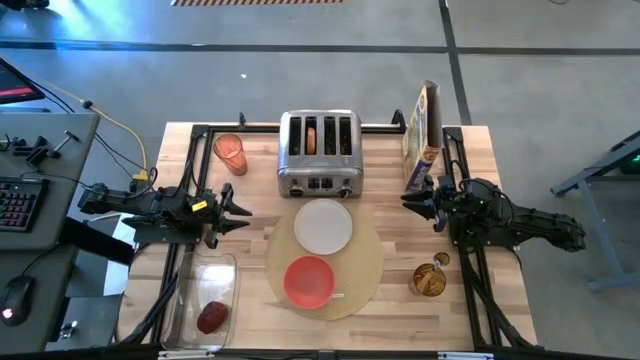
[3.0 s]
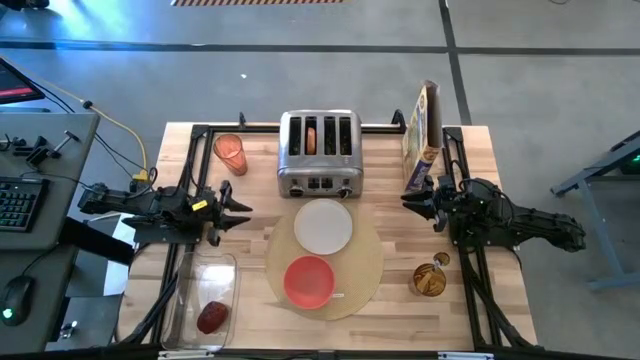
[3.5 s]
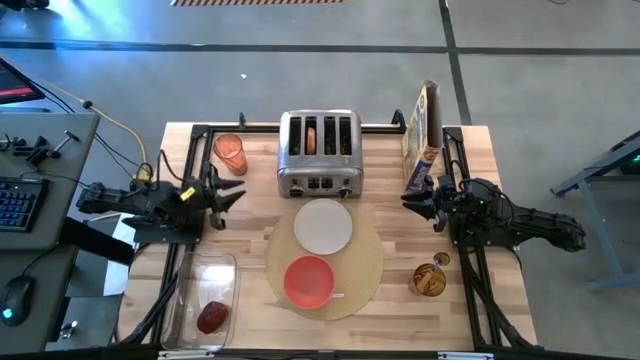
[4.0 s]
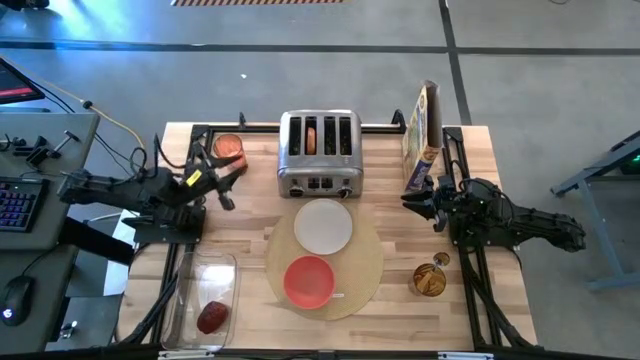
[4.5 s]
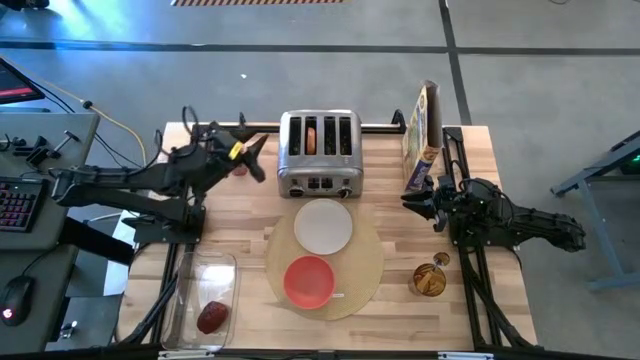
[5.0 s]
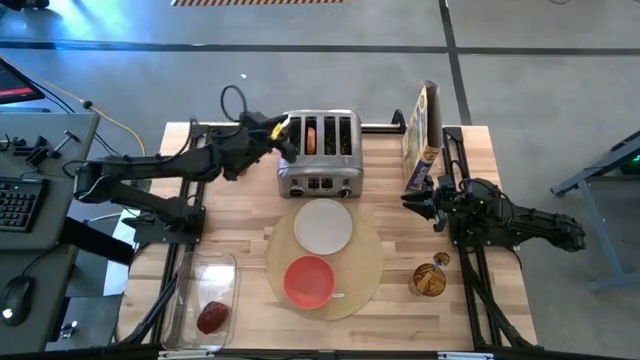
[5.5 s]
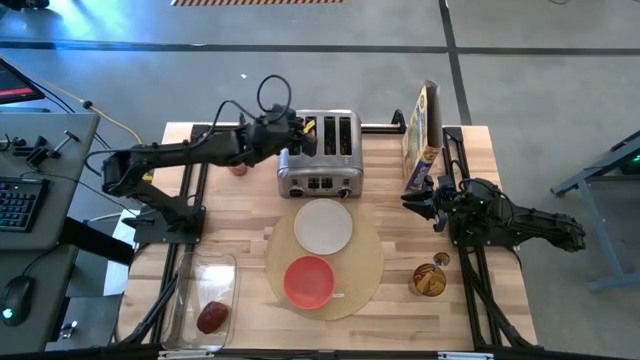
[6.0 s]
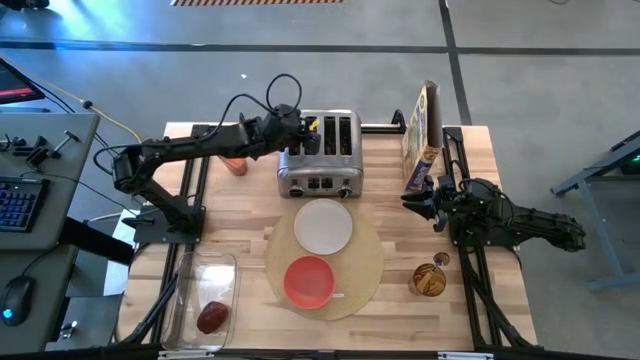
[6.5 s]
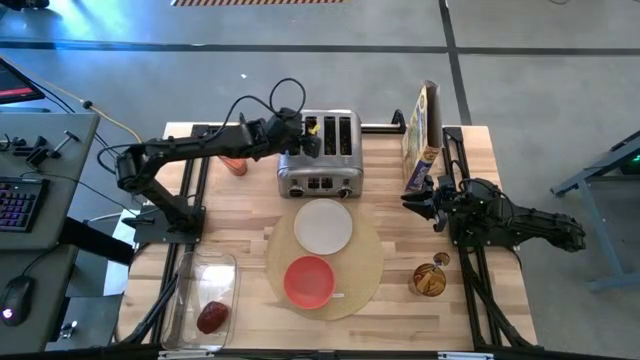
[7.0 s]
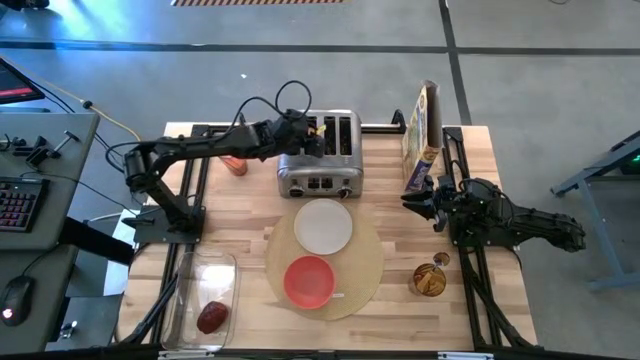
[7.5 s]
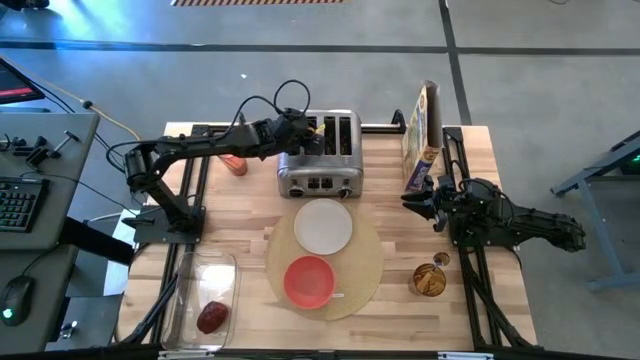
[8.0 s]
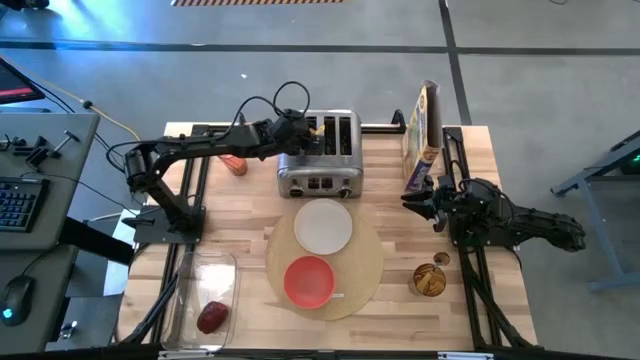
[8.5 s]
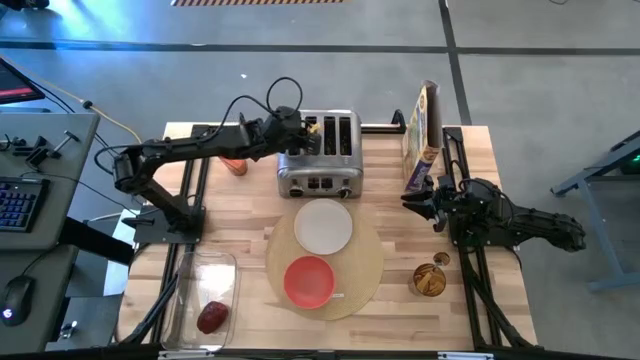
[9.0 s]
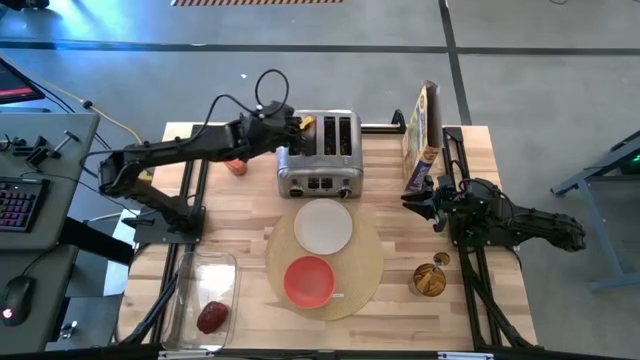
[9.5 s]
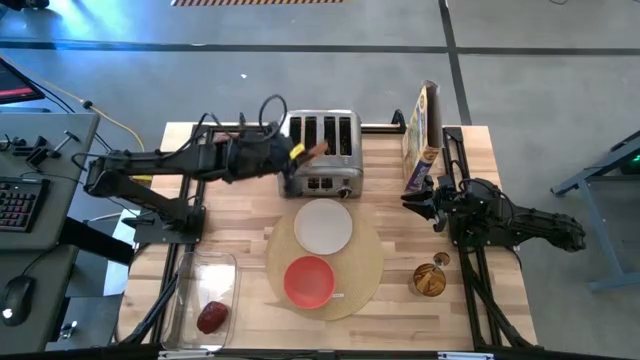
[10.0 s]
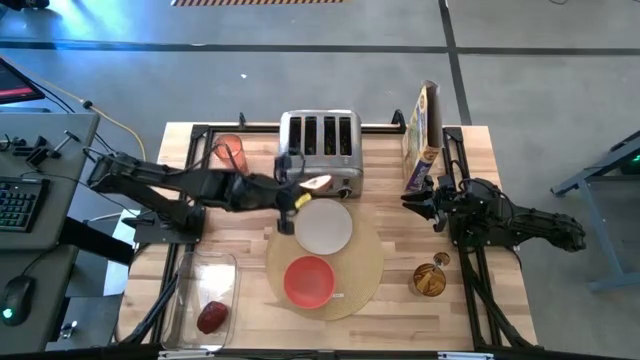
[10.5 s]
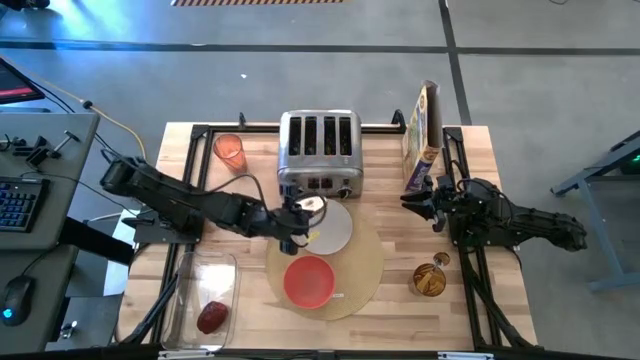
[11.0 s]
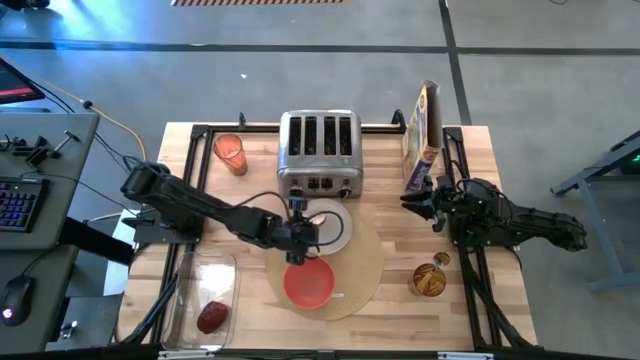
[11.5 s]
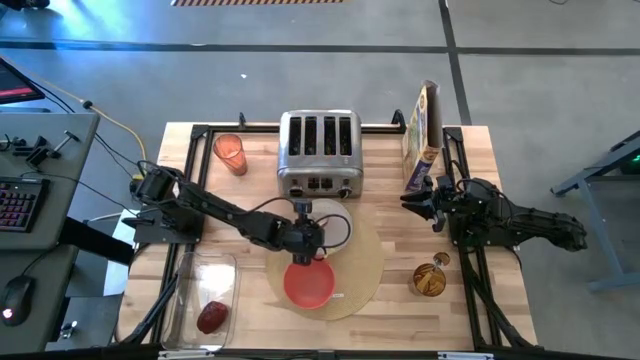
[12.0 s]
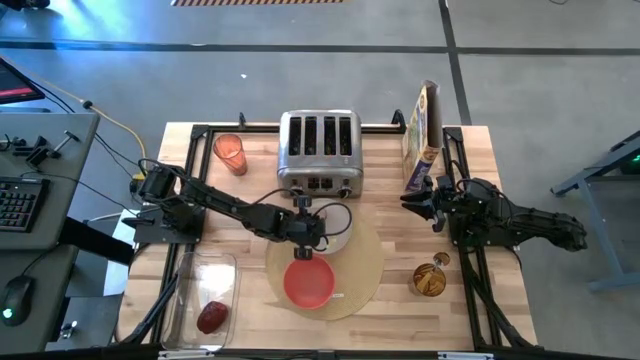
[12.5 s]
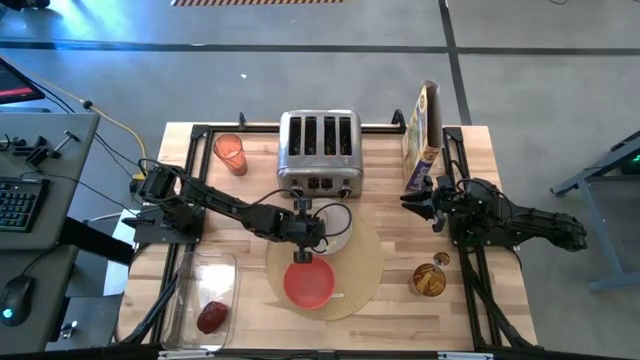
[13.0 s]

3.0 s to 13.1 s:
Task: Arrange a breakfast setting
Put the bagel bread on the plate on the placemat

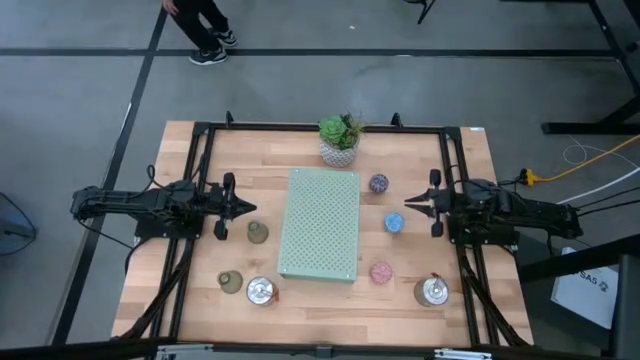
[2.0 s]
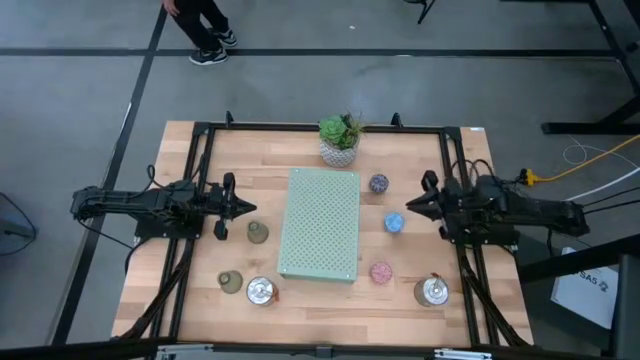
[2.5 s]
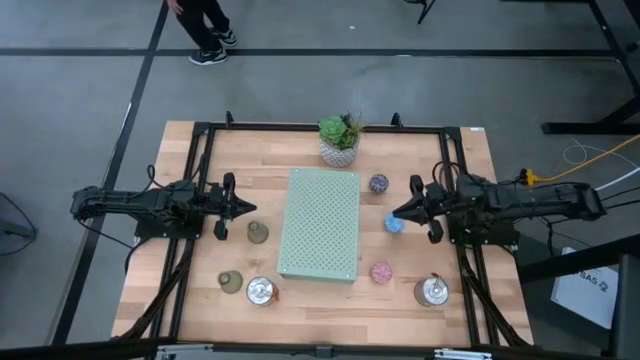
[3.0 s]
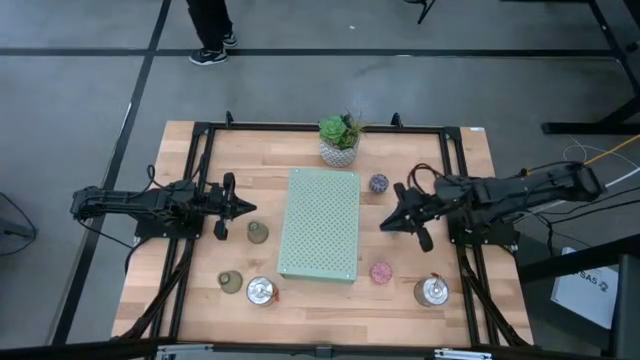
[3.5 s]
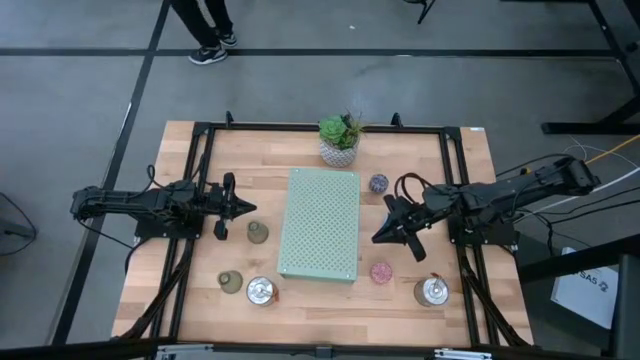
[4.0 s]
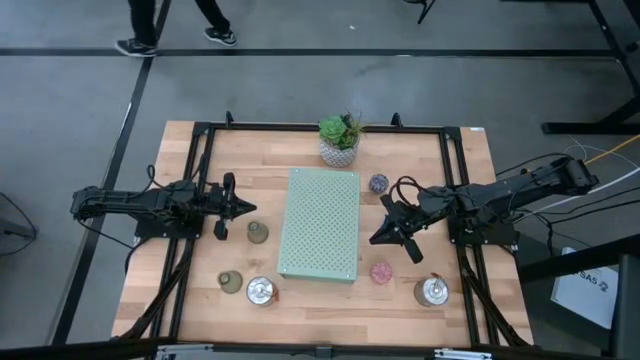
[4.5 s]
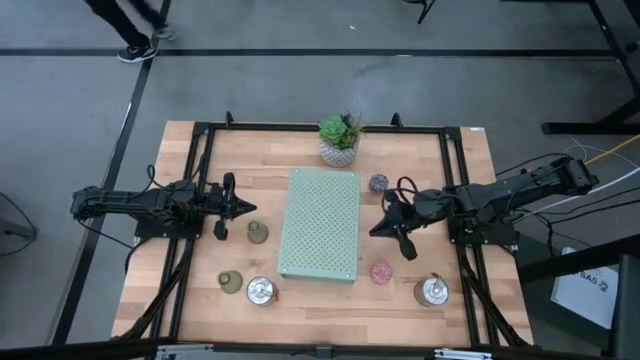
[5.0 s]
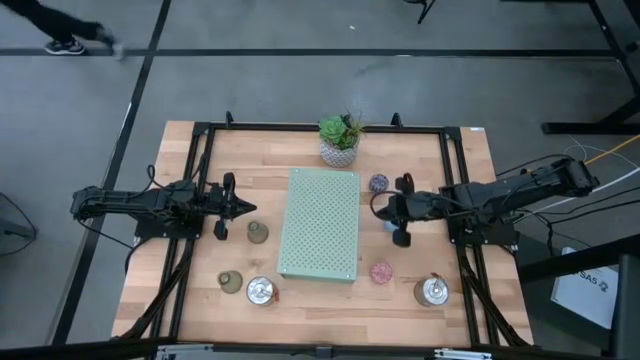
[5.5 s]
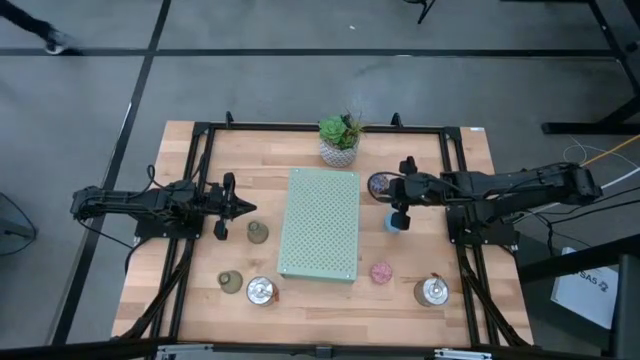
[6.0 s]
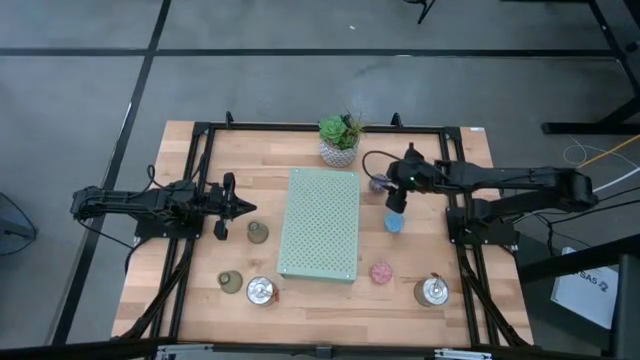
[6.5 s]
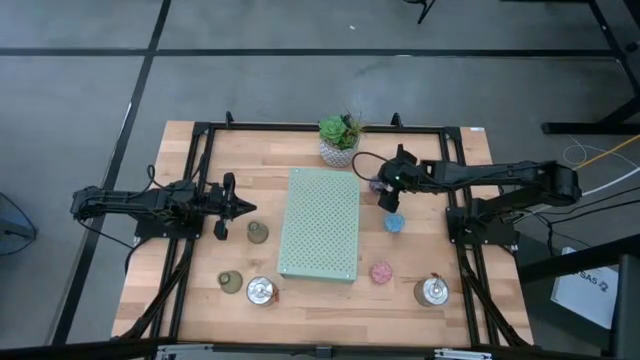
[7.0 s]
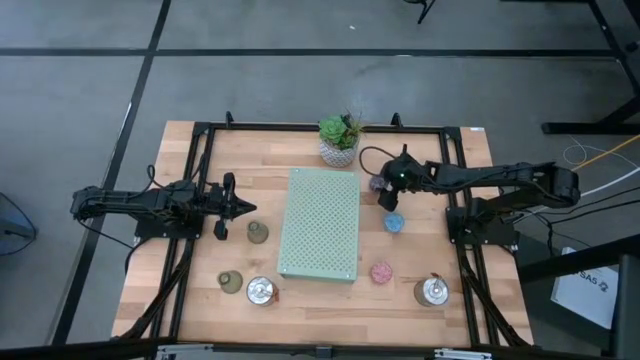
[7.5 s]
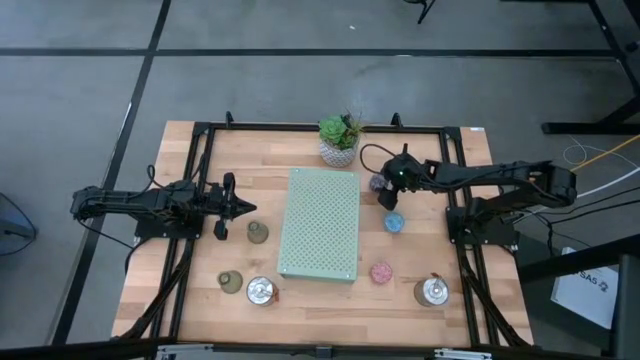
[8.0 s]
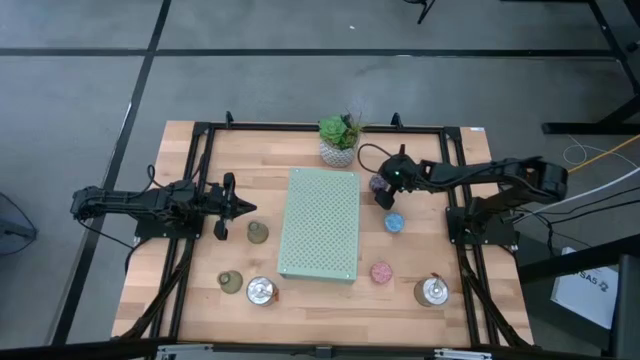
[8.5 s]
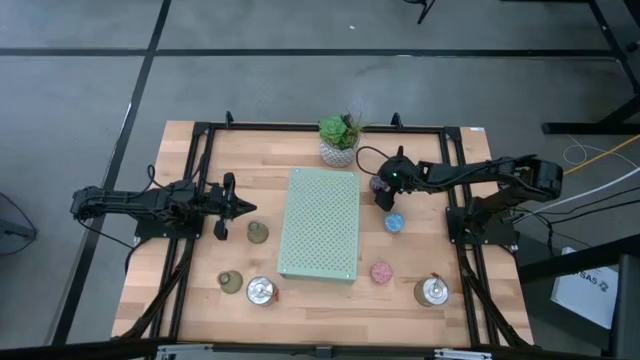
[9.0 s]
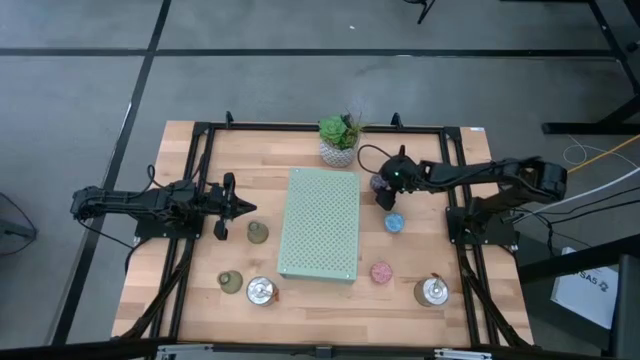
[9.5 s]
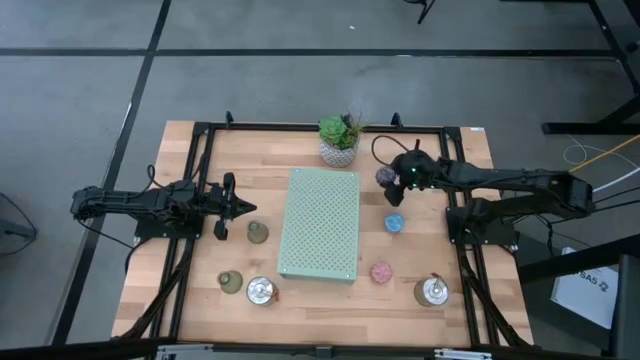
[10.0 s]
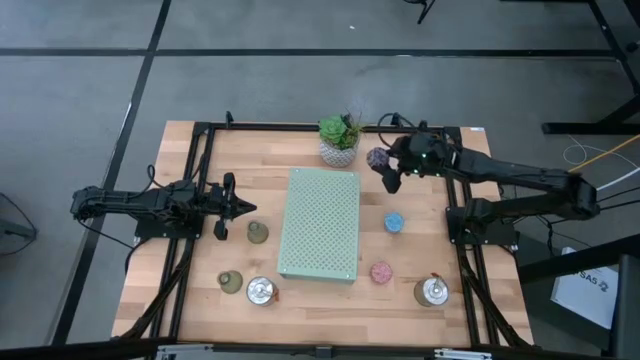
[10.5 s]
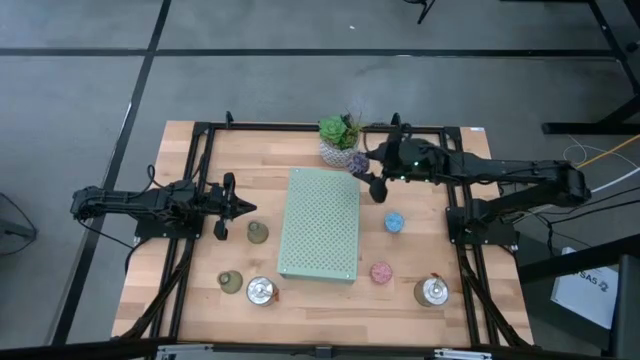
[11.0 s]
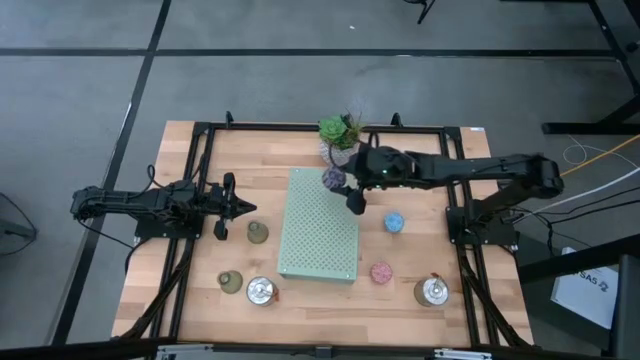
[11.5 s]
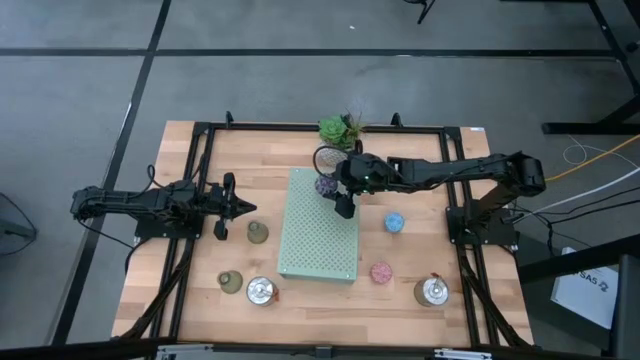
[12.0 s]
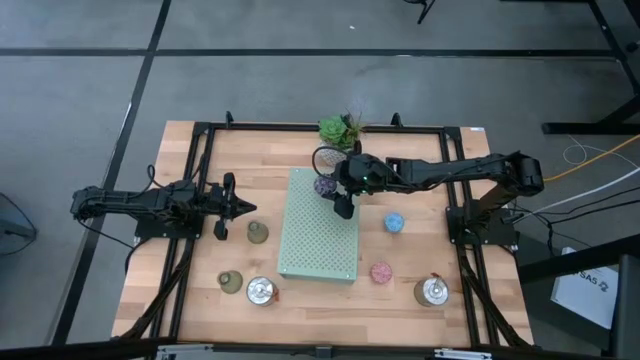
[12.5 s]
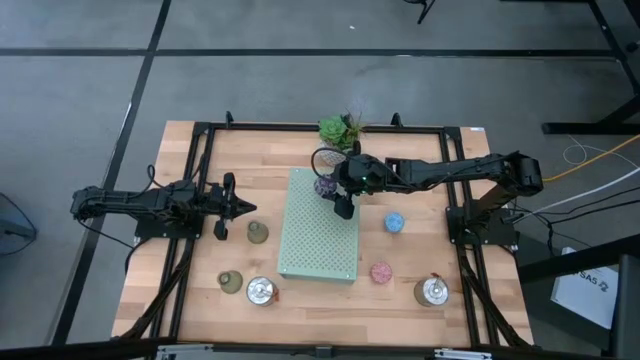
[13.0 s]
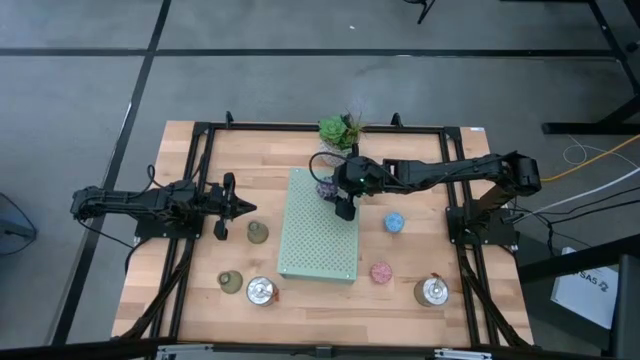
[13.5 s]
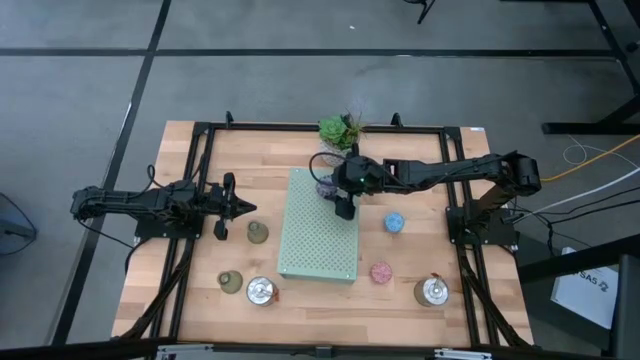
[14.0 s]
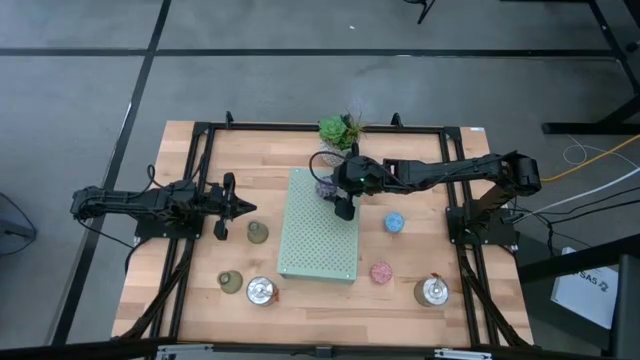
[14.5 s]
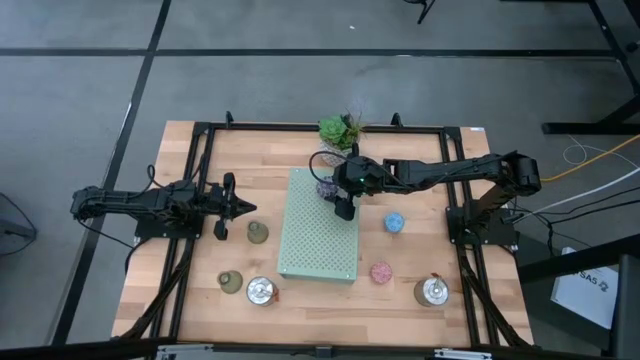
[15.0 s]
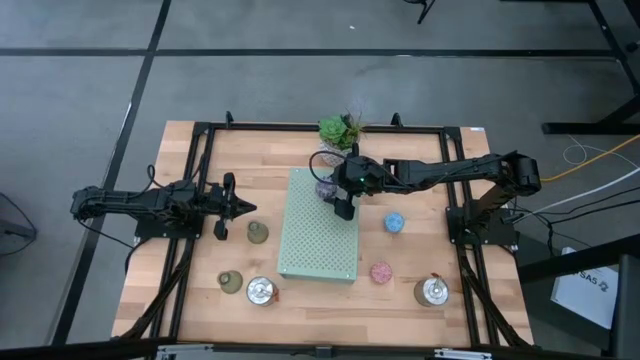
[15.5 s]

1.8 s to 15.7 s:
Task: Pick & Place candle stick holders
Put the black patterned scented candle on the shelf
